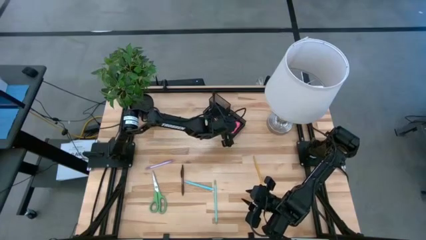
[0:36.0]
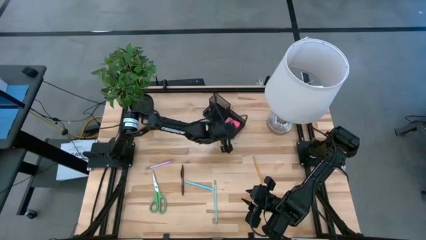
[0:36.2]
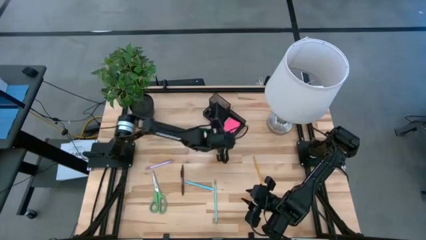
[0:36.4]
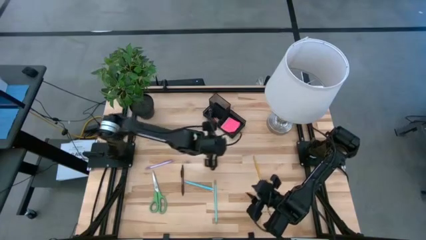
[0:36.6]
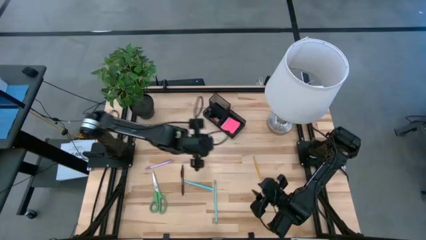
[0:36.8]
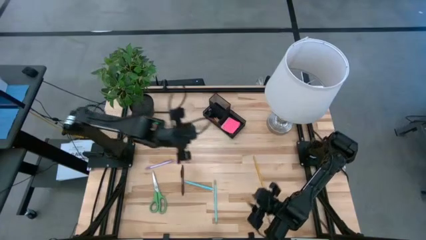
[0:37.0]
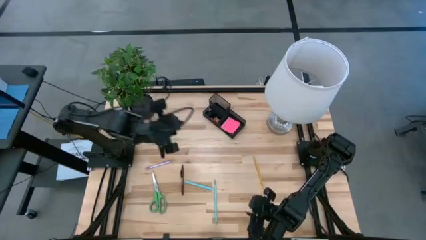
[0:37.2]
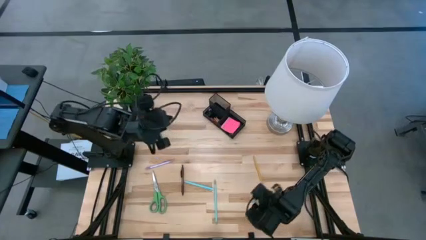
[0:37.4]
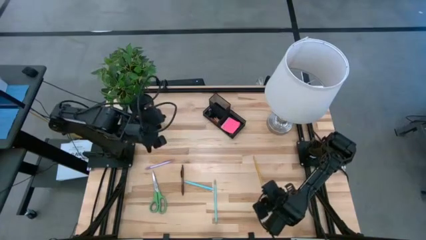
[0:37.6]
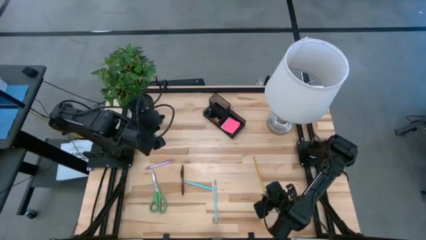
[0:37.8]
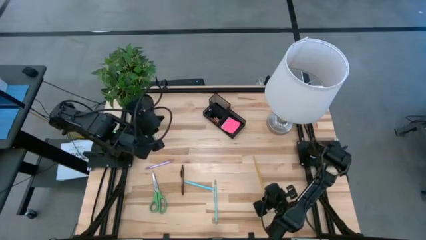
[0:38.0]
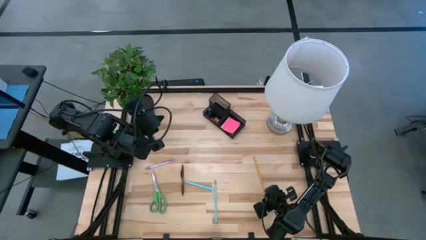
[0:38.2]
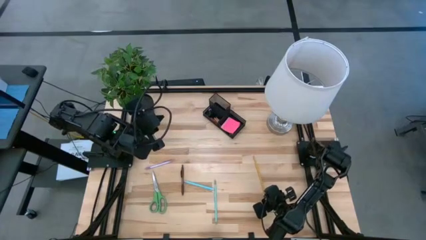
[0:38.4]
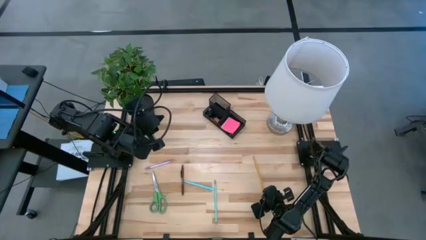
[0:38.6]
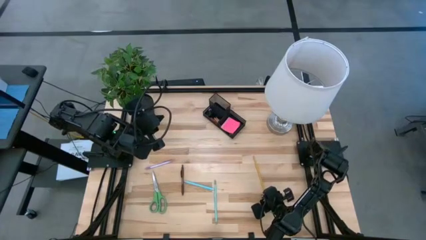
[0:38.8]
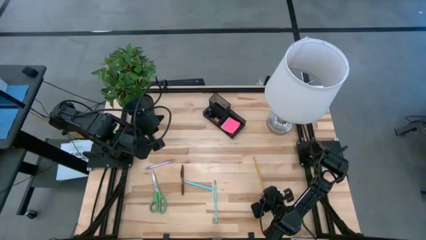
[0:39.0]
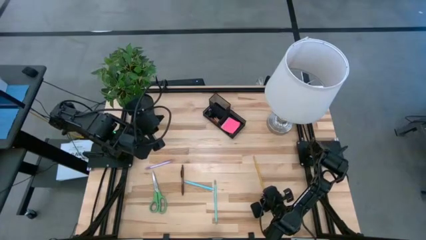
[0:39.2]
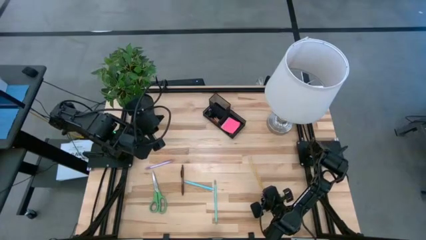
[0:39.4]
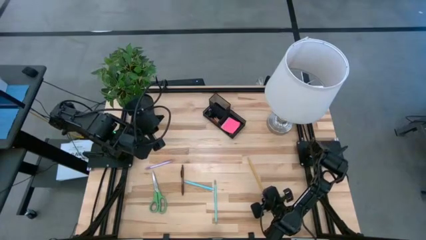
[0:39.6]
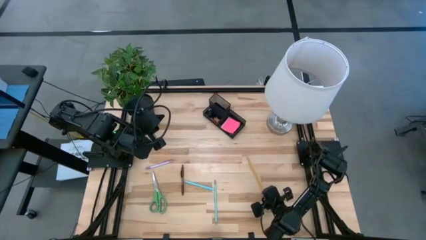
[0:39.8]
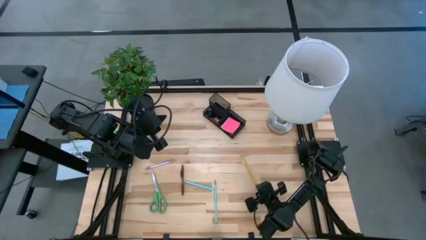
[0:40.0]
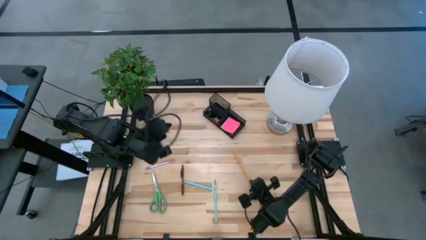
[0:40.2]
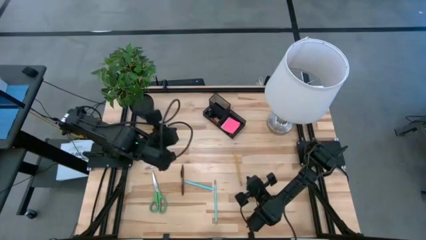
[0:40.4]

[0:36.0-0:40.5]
Task: Pick and place office supplies into organizer
Put the yellow pencil into the desk organizer

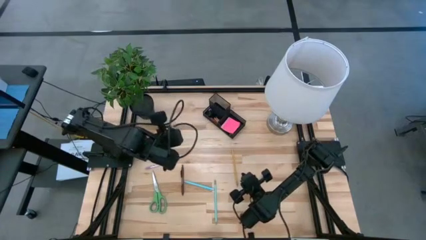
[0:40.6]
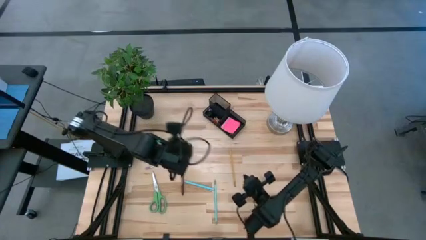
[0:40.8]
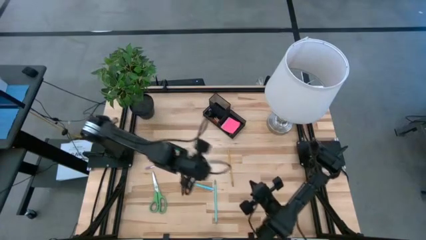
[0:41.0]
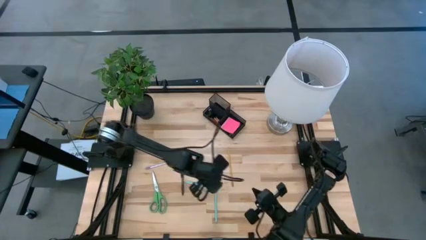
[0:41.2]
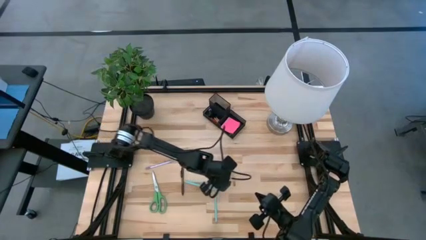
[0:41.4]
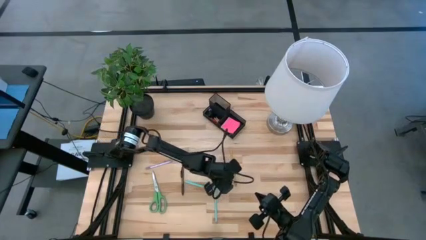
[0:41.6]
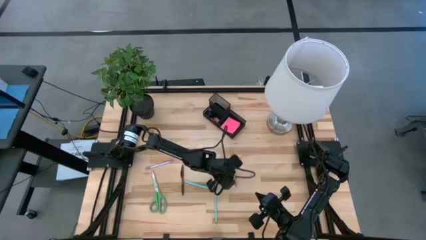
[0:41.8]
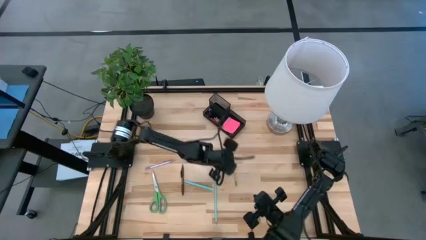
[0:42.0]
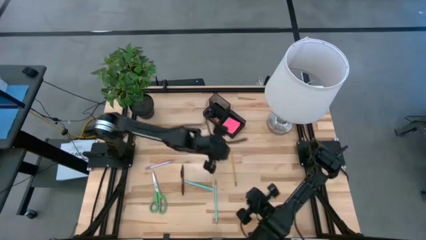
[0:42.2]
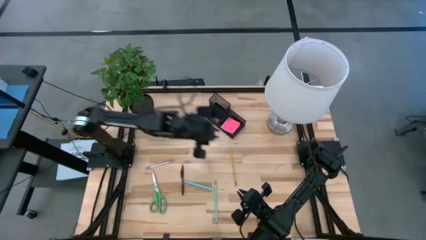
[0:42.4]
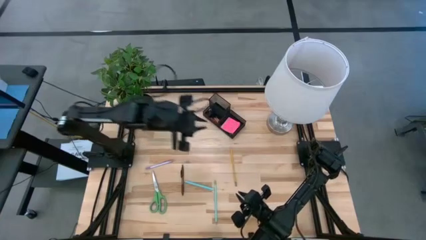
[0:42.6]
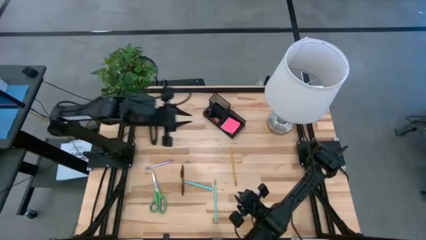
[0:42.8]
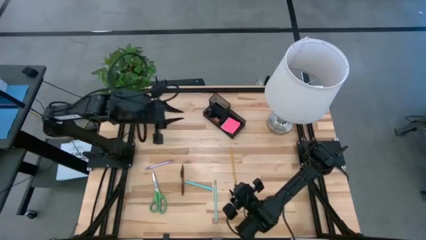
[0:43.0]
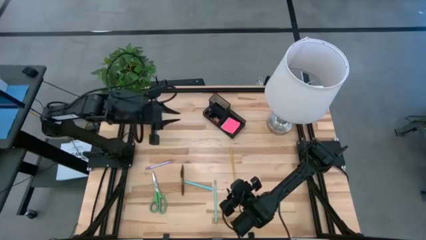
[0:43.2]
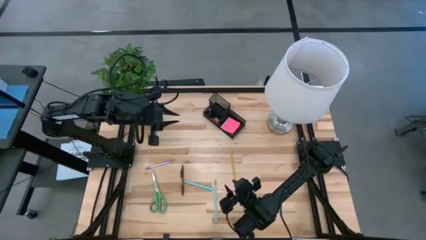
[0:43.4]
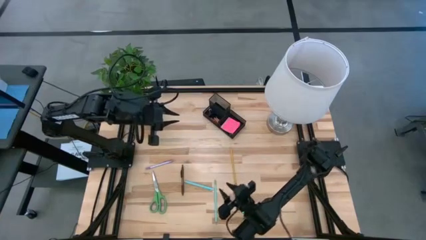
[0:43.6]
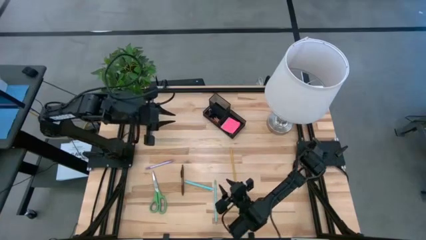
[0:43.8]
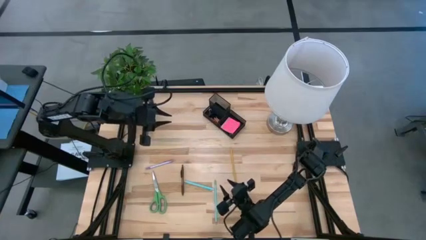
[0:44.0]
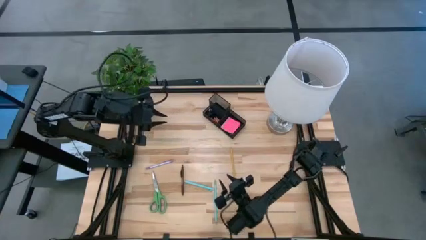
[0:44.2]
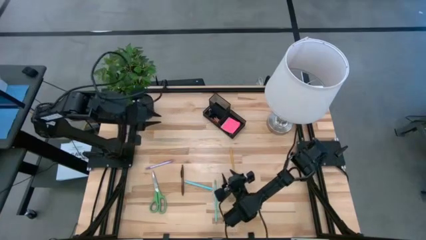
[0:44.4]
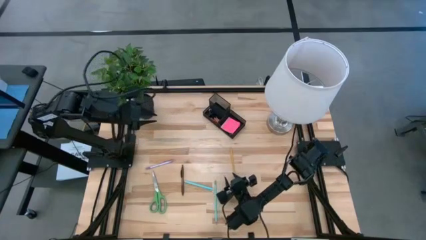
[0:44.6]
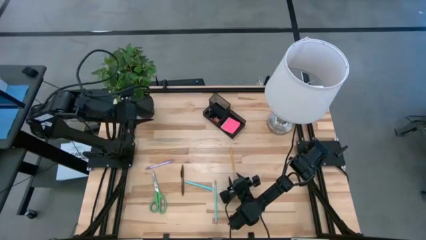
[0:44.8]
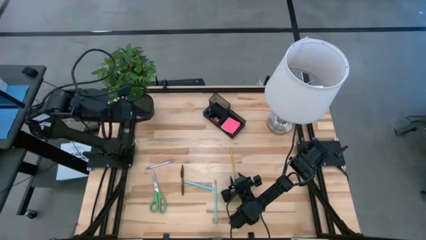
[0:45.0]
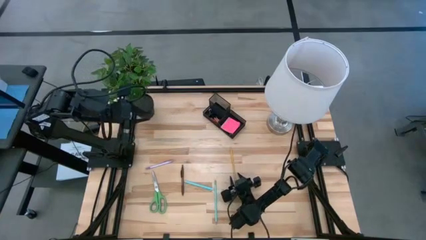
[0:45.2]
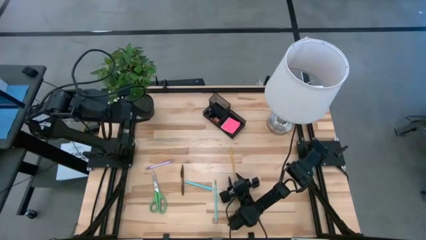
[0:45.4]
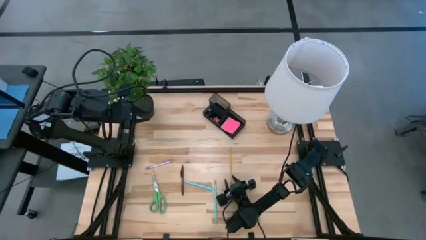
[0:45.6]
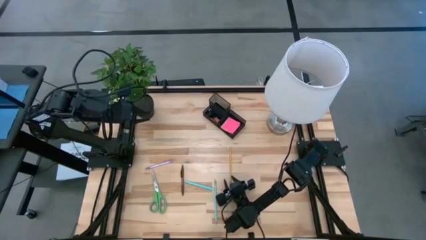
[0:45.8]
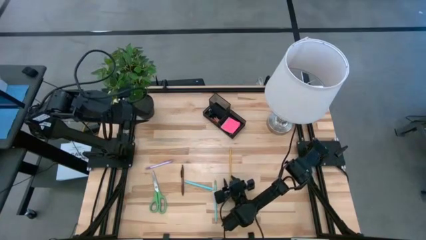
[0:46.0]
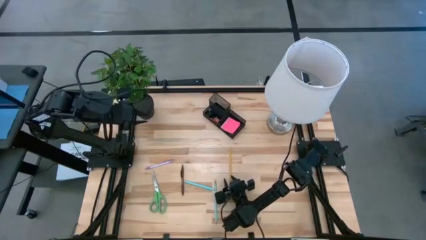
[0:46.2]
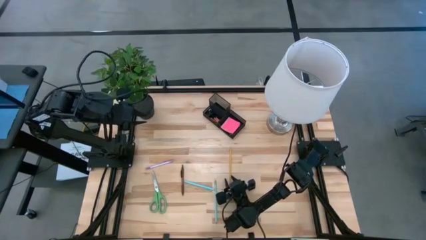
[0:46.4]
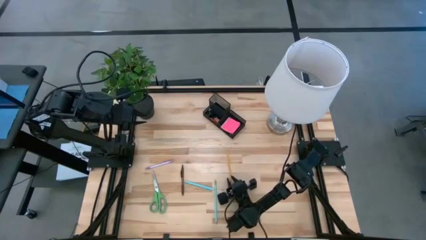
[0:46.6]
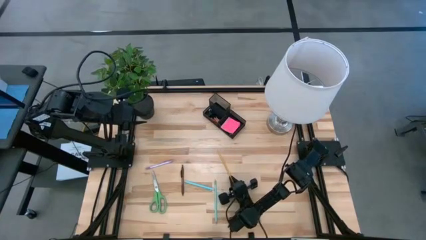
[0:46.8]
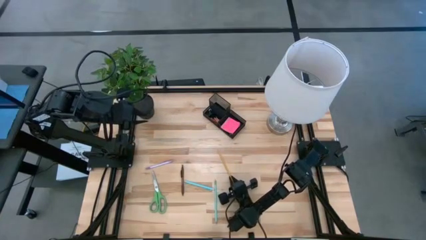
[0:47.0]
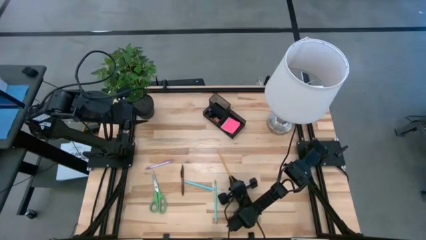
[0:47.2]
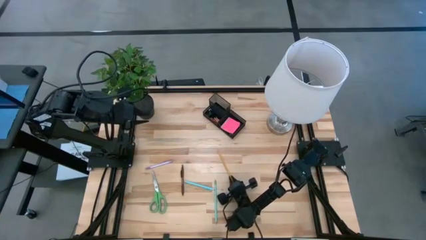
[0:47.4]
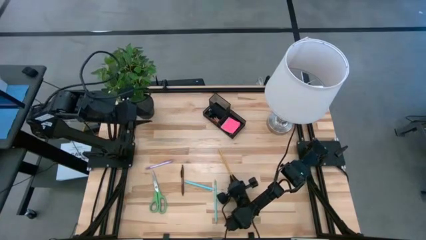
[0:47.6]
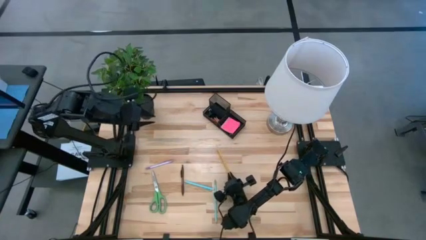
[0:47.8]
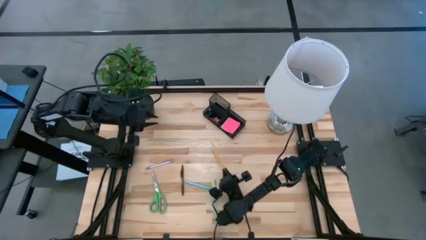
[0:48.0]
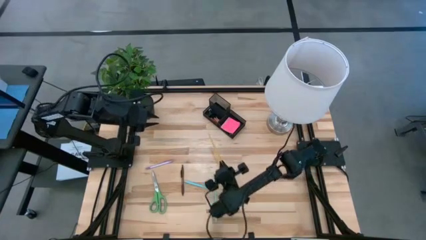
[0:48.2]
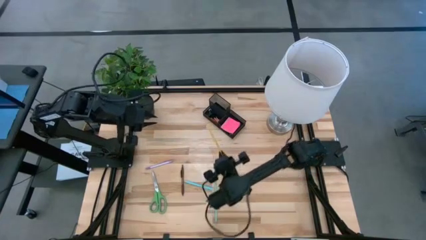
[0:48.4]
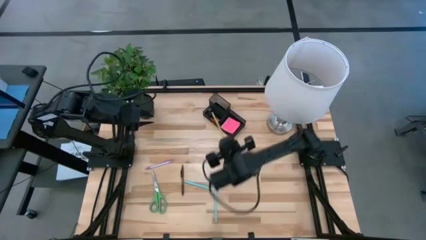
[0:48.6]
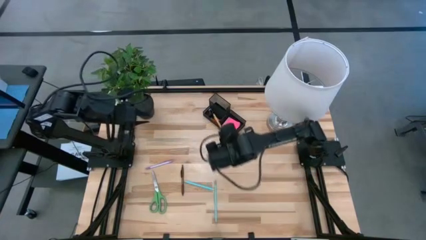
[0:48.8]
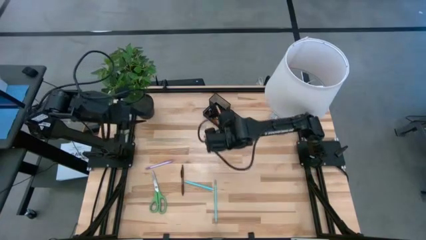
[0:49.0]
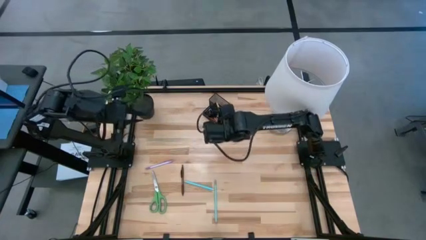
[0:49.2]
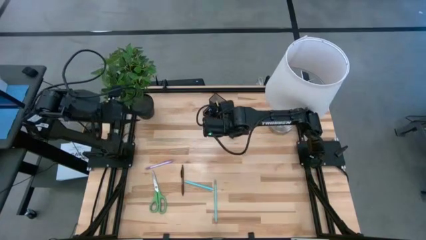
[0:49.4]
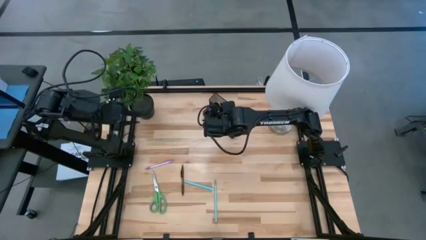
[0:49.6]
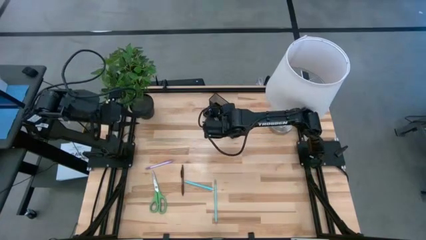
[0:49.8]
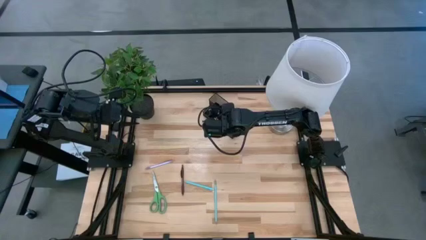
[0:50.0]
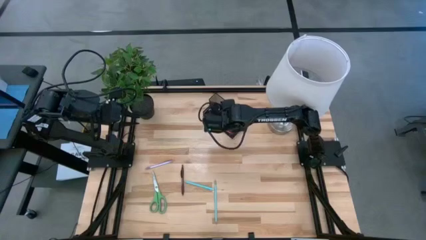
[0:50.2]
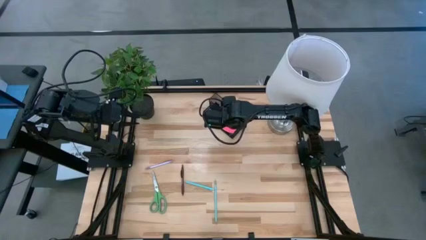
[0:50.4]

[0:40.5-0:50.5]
Put the yellow pencil into the desk organizer

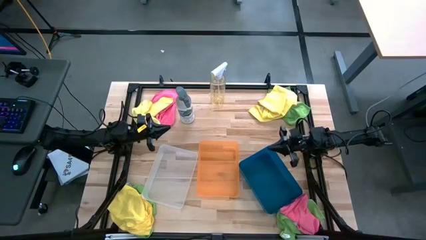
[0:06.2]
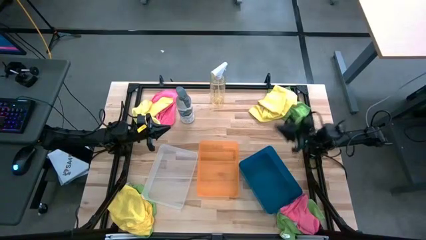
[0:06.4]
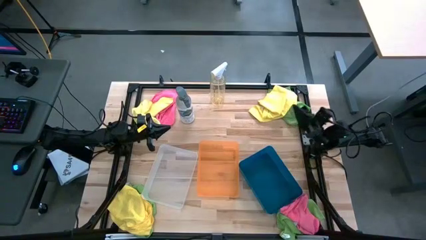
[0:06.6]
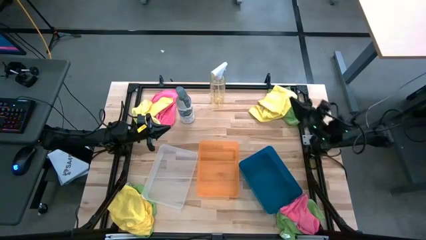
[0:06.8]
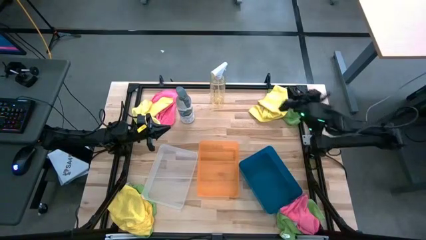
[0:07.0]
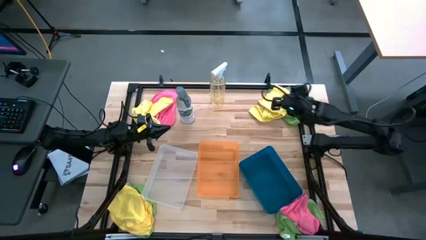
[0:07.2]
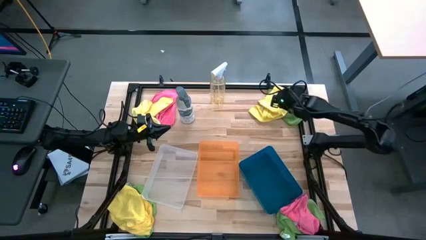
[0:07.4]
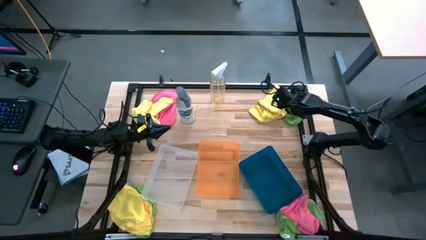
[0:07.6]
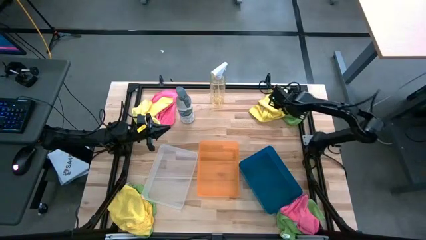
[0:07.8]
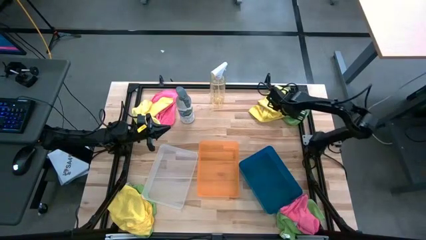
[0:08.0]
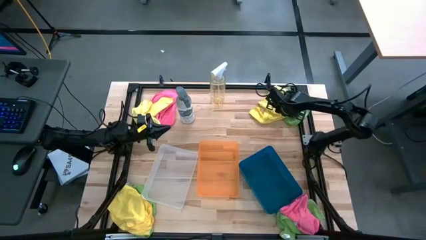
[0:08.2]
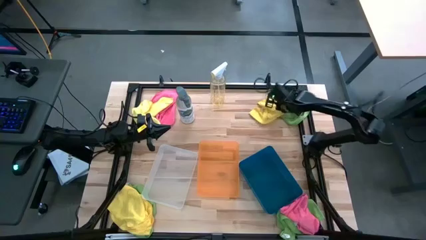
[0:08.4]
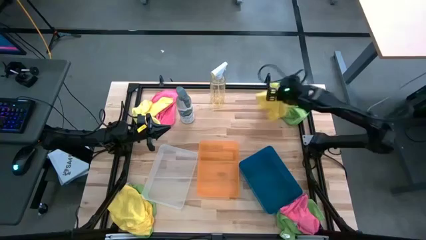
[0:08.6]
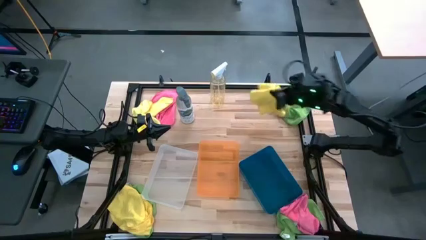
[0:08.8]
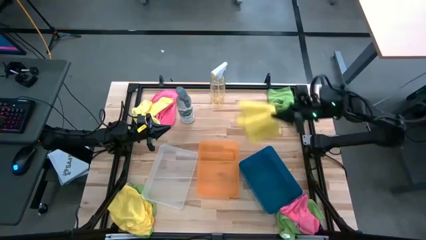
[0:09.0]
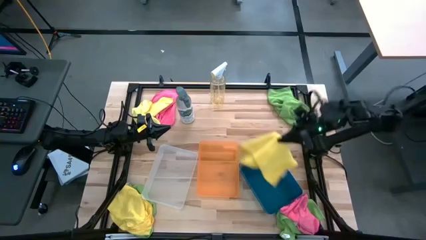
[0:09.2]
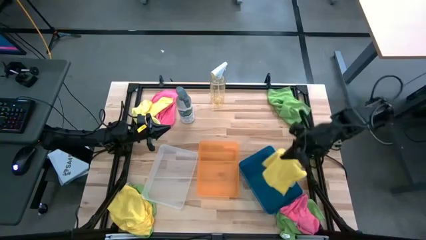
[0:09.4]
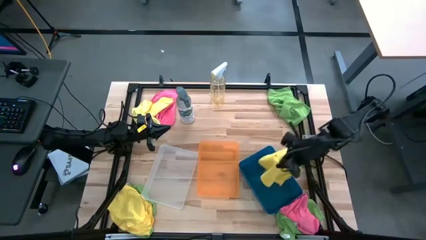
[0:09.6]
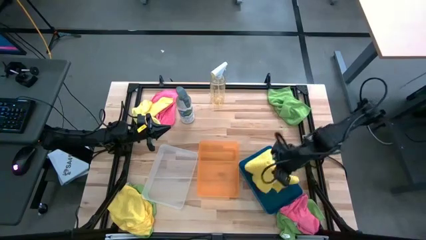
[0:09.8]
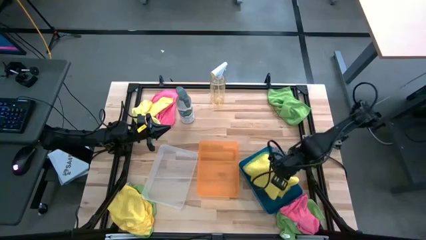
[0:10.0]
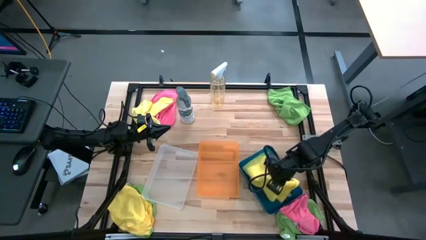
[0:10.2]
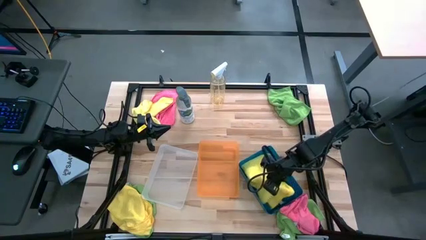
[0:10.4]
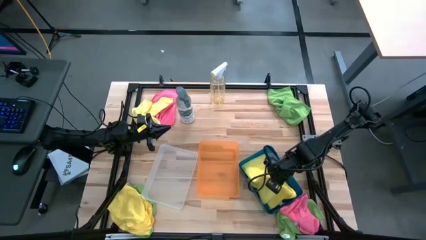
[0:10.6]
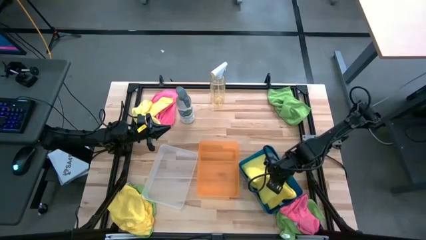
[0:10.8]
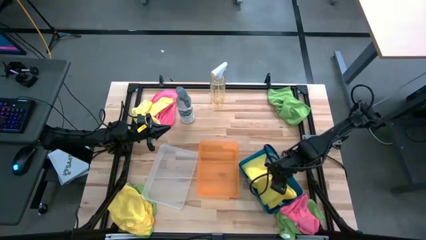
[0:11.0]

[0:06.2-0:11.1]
Task: Sort microfiber towel by color & place in baskets
Put the top right yellow microfiber cloth into the blue bin
